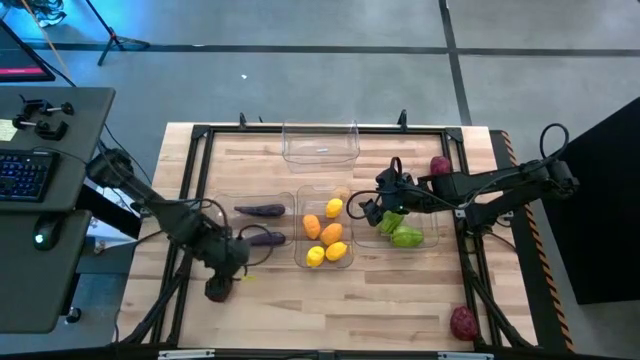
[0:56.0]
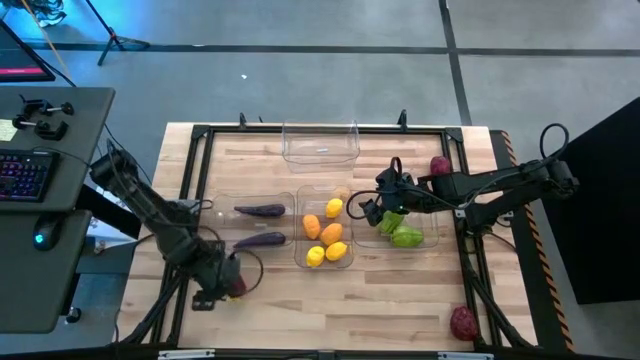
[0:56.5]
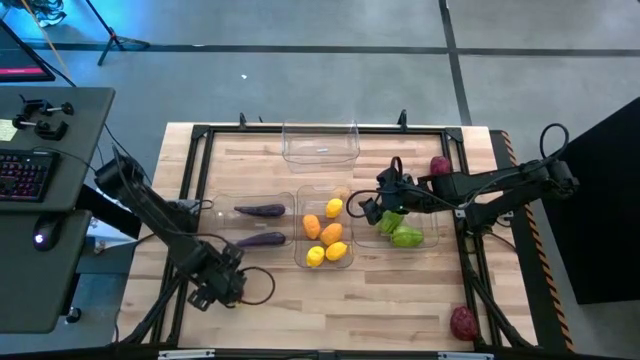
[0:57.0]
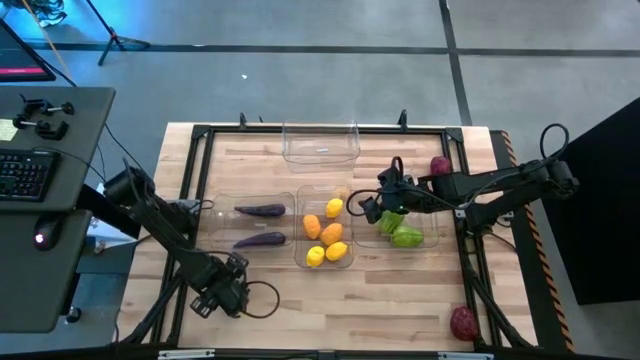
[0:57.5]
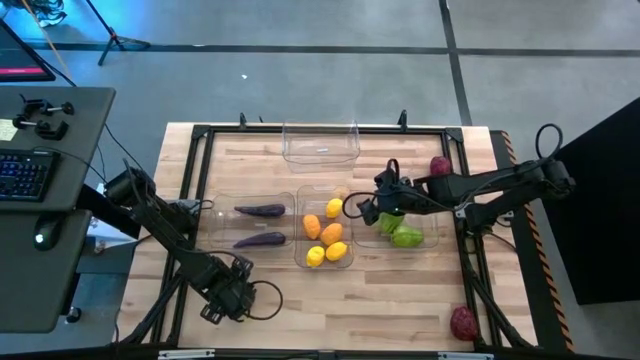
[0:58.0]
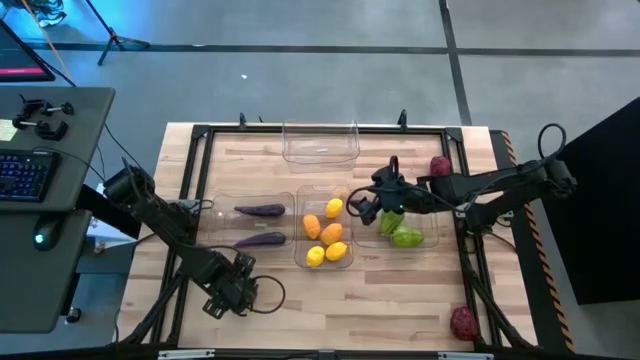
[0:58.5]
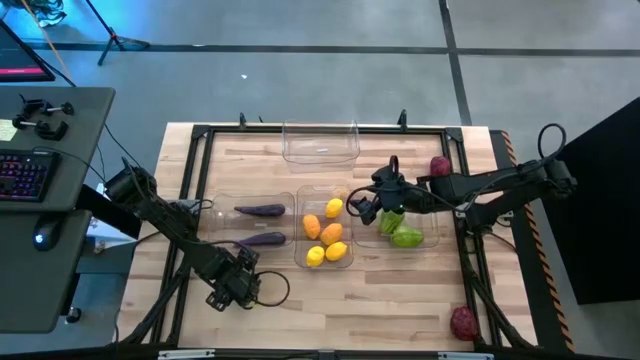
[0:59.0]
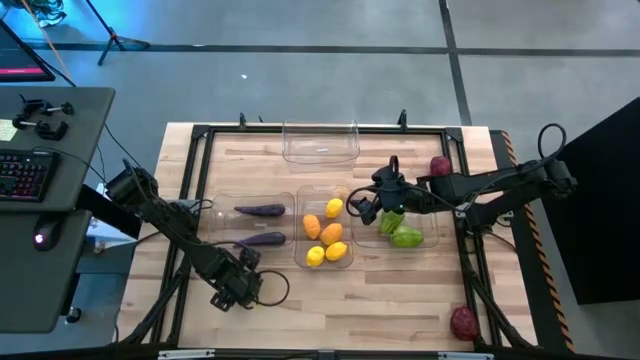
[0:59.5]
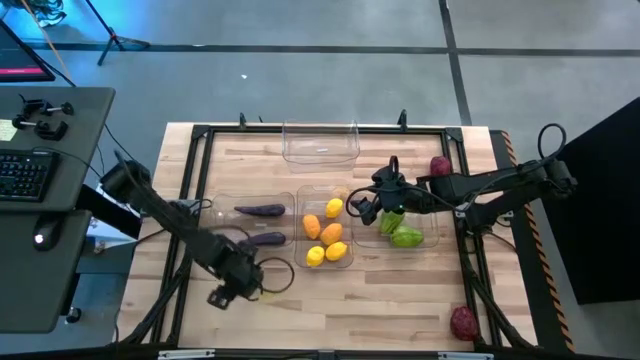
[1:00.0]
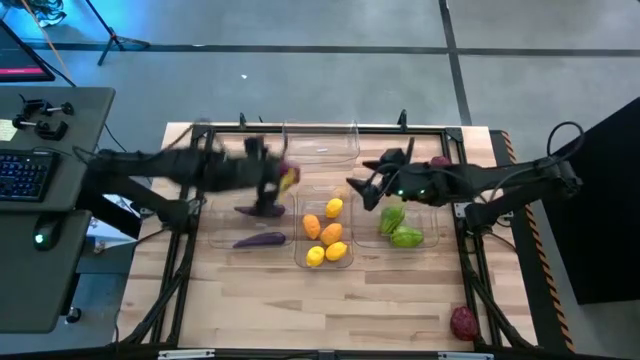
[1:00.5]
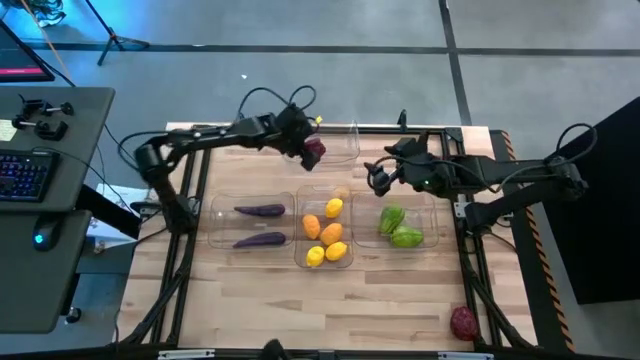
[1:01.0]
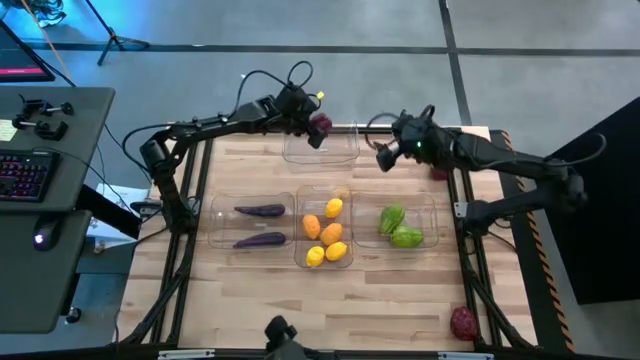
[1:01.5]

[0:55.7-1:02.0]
Task: Sort produce into baskets
Put the apple into the top transparent bin

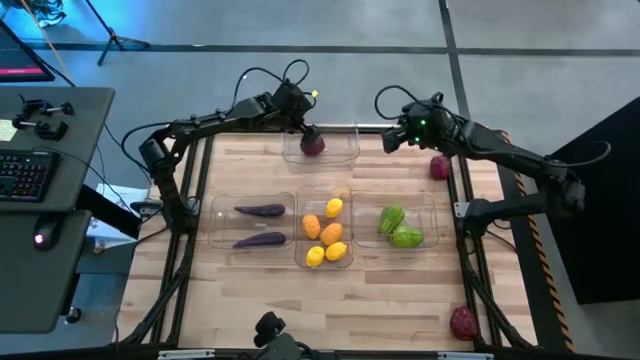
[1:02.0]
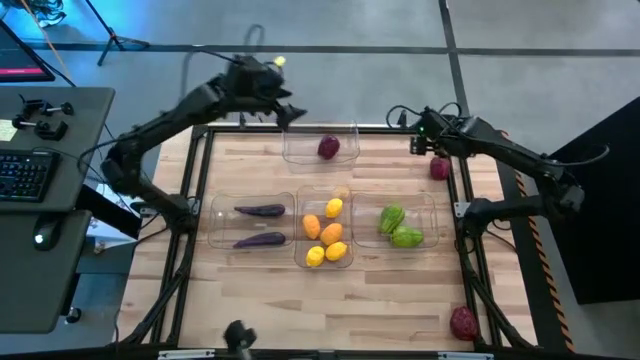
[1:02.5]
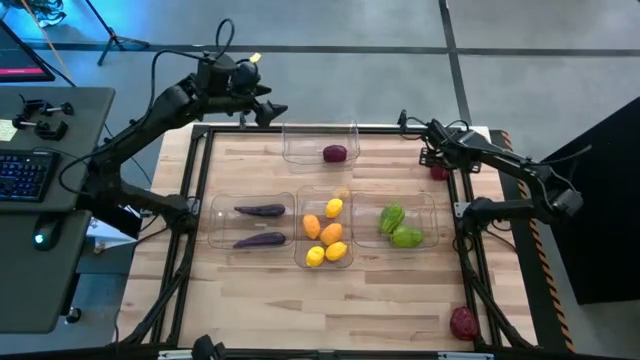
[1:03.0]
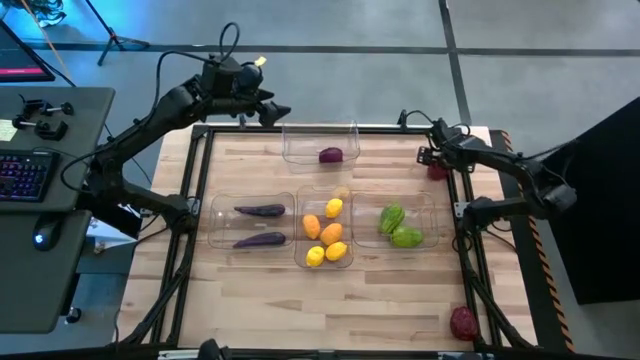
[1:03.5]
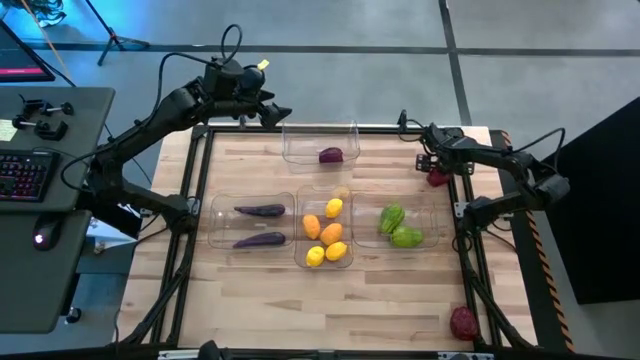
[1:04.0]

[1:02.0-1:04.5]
Put the apple into the top transparent bin

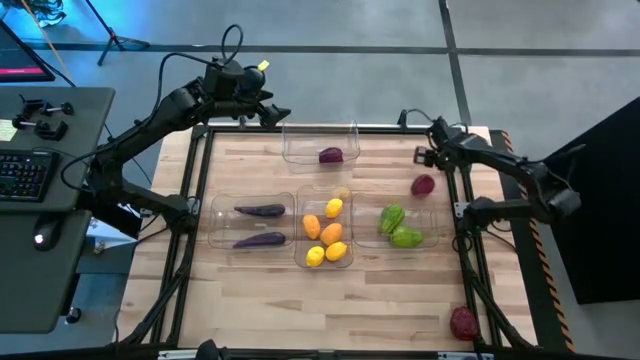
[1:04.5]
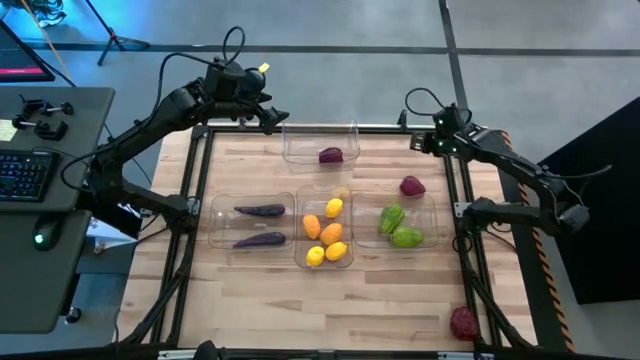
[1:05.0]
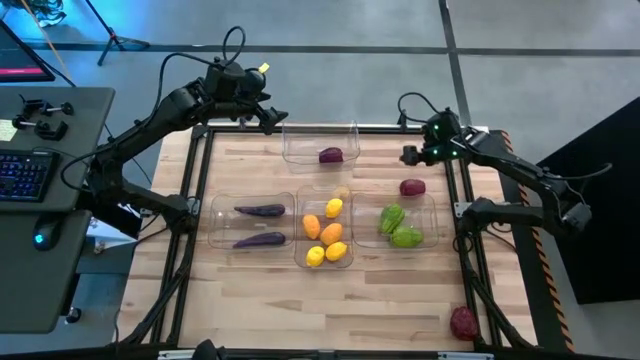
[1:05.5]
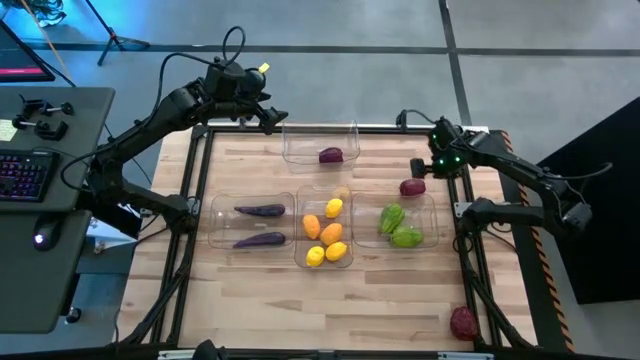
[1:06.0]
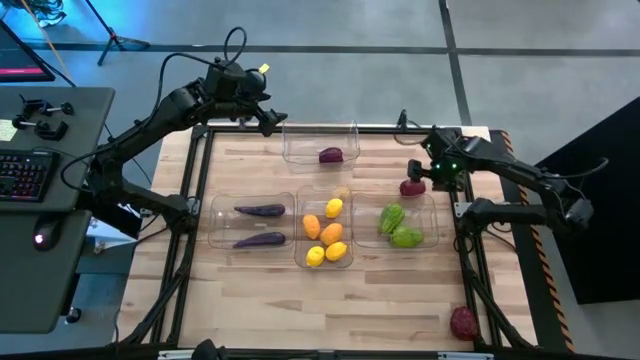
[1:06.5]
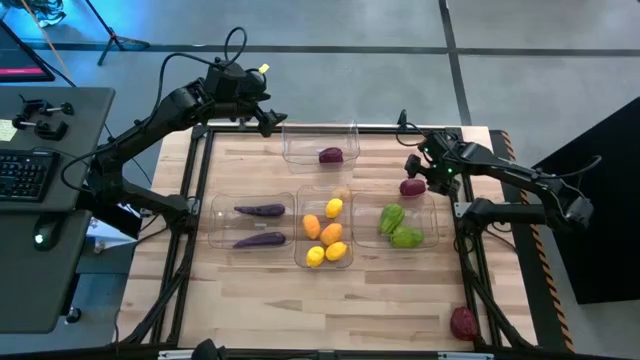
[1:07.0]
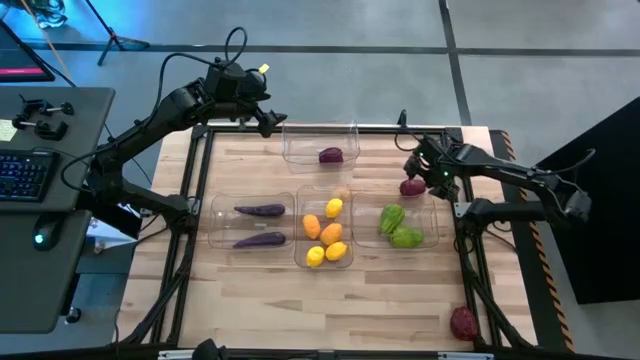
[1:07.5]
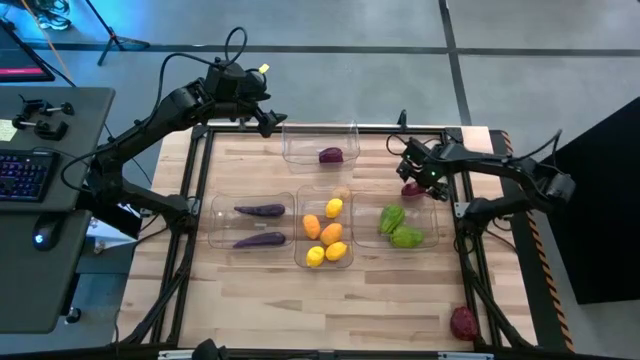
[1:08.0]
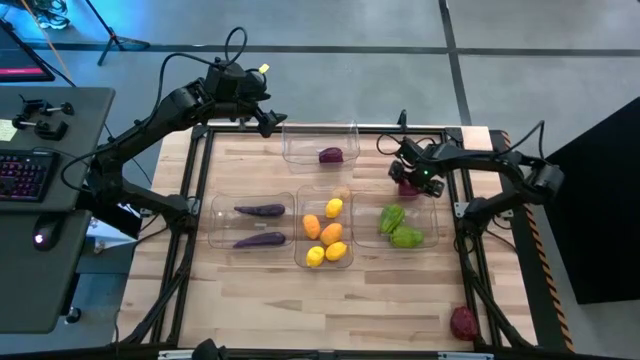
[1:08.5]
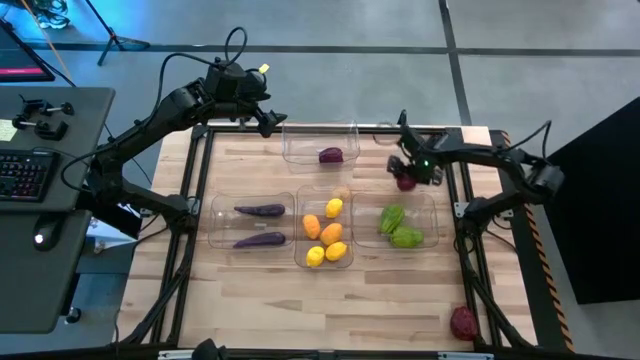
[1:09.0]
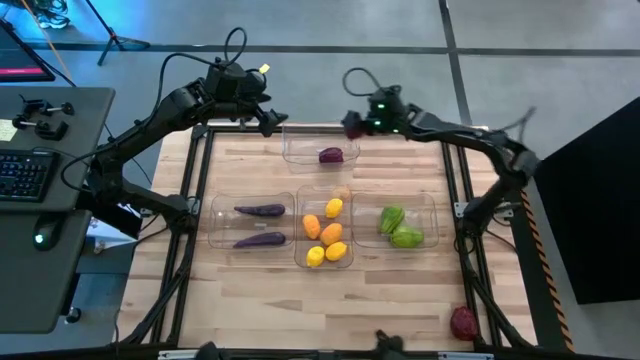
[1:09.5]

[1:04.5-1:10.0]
Put the apple into the top transparent bin

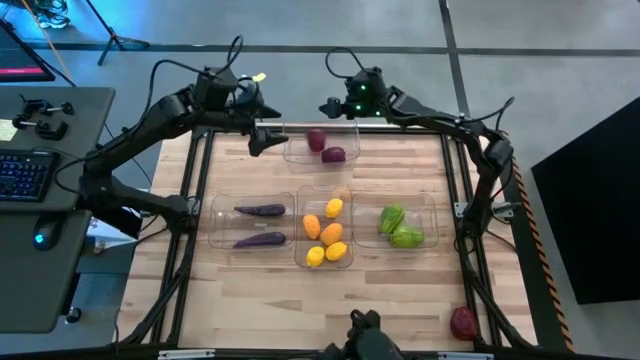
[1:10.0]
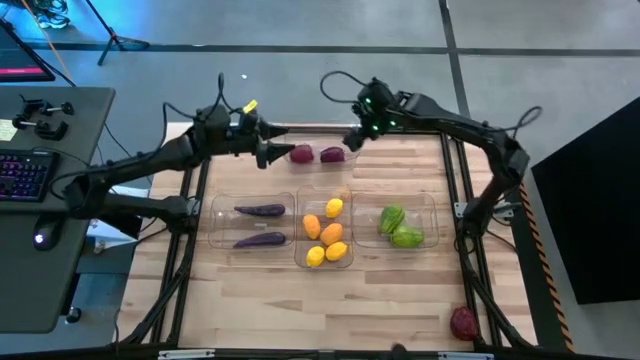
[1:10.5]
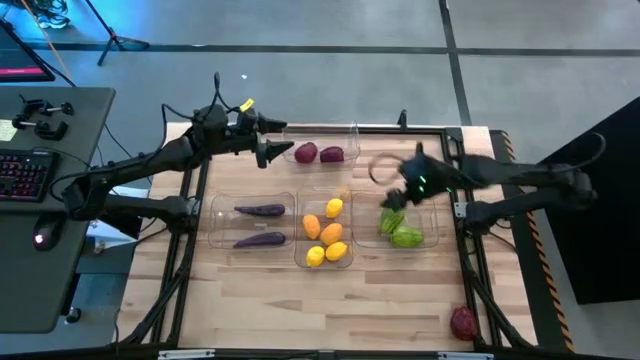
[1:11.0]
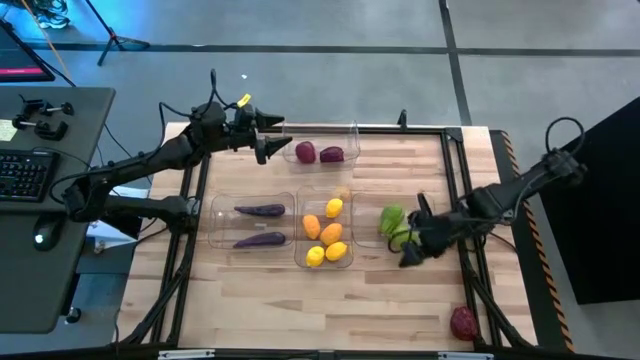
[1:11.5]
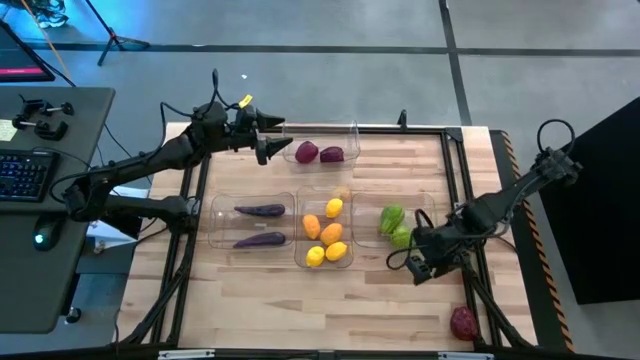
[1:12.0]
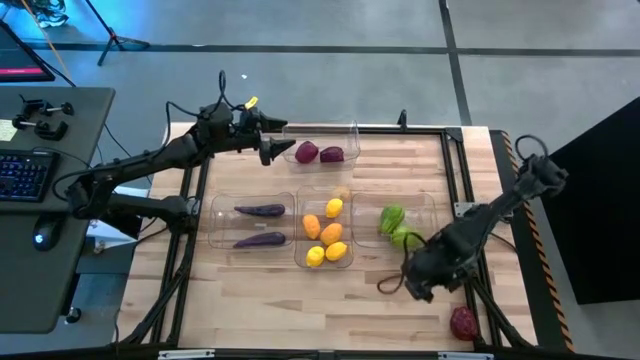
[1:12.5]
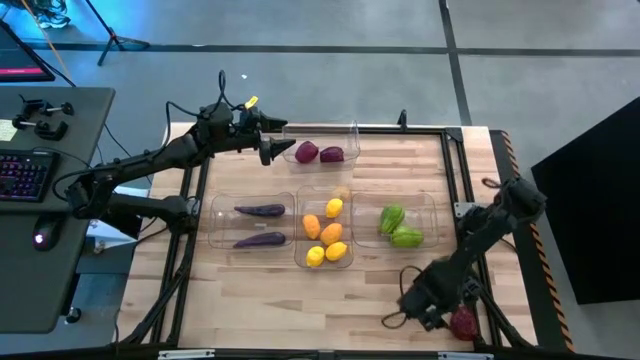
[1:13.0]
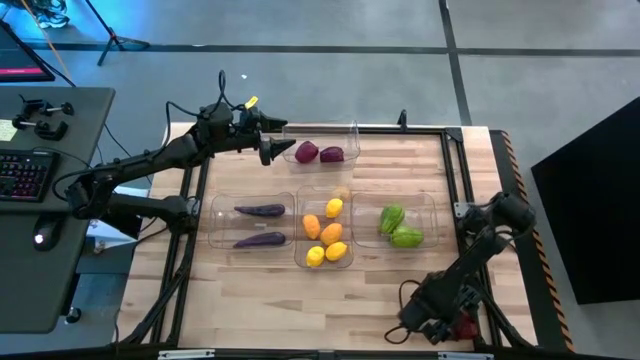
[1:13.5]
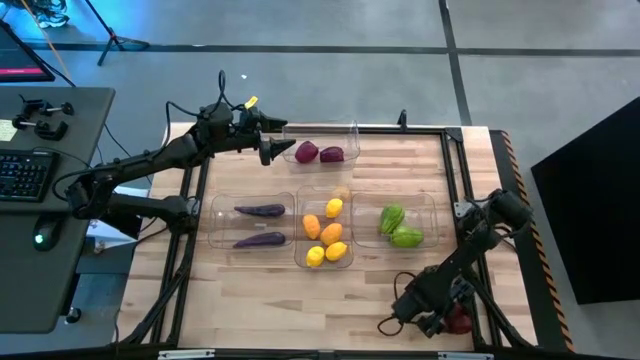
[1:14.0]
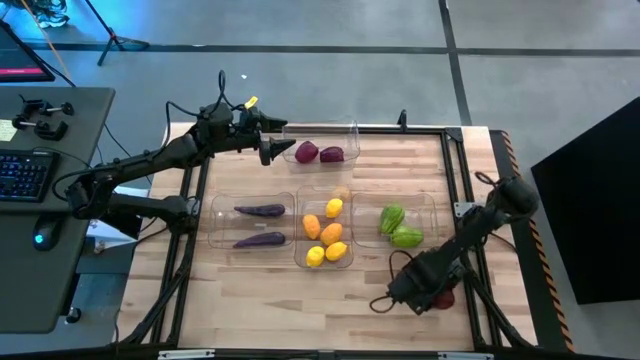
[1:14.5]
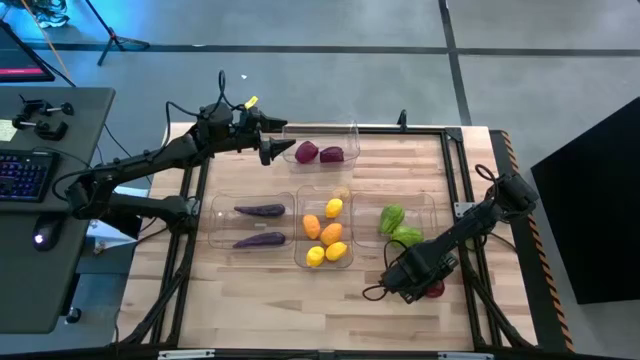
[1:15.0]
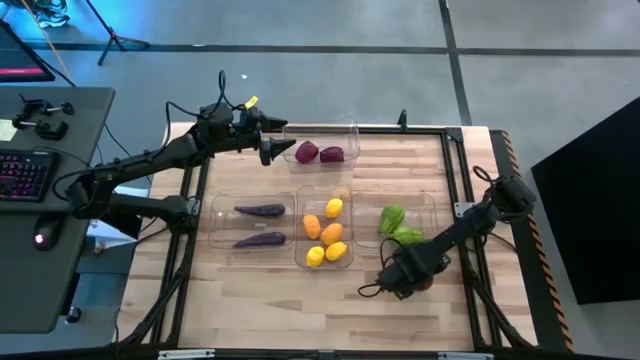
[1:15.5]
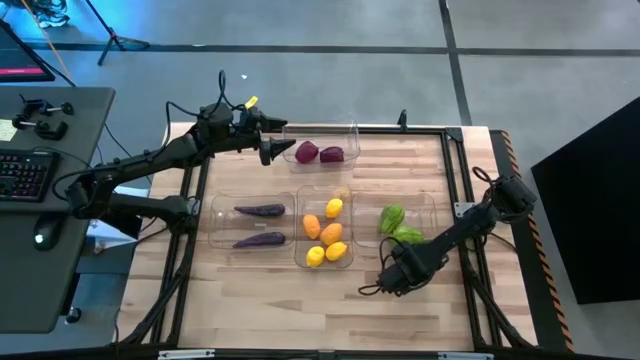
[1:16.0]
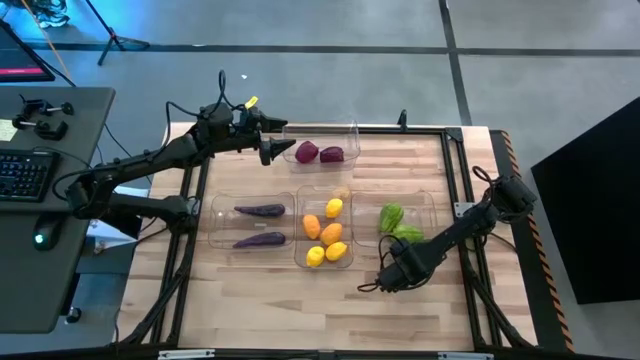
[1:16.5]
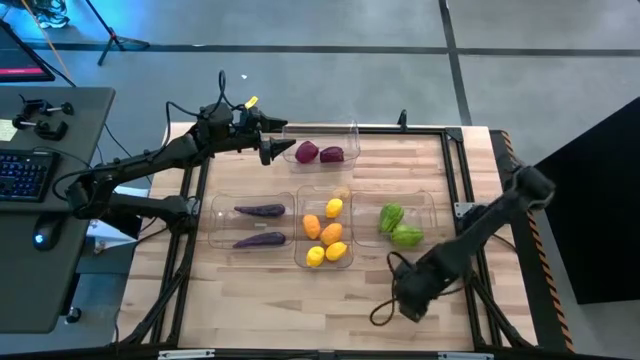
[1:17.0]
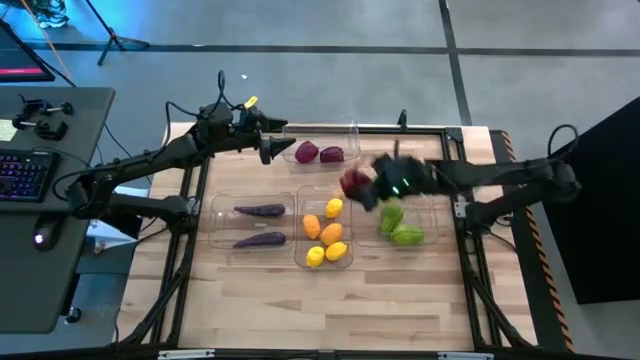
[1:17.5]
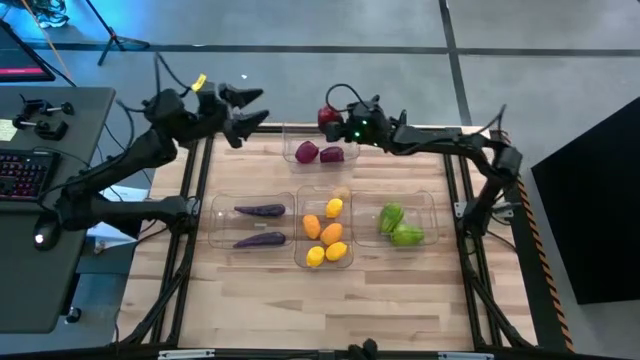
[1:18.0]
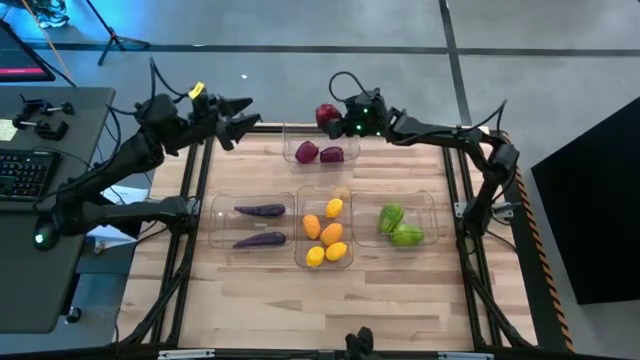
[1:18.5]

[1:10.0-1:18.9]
Put the red apple in the top transparent bin
